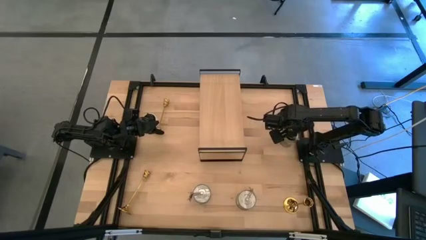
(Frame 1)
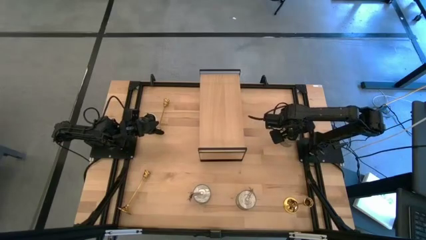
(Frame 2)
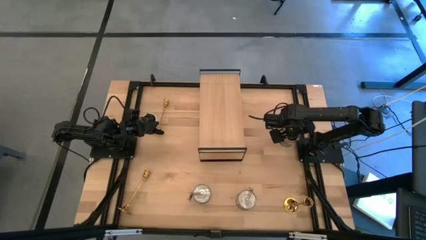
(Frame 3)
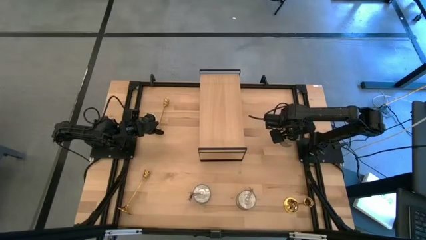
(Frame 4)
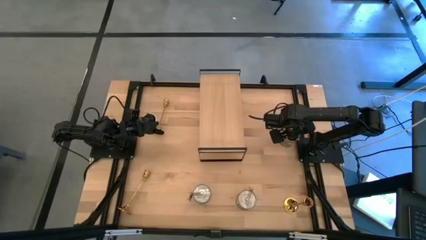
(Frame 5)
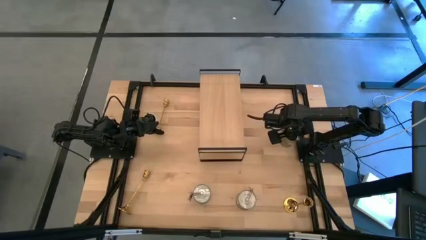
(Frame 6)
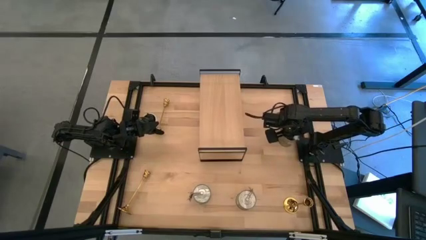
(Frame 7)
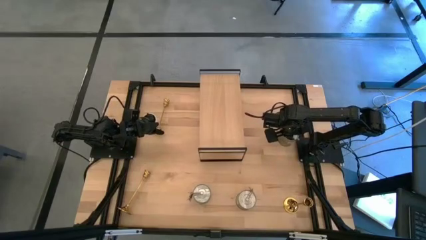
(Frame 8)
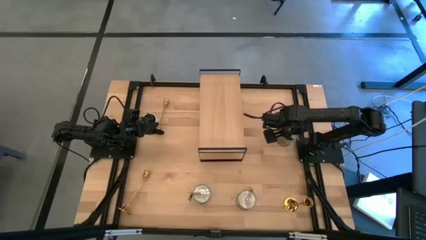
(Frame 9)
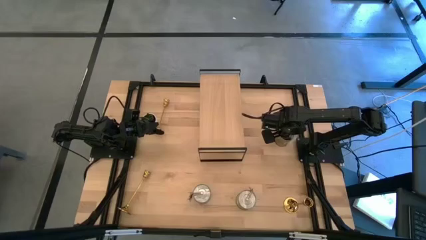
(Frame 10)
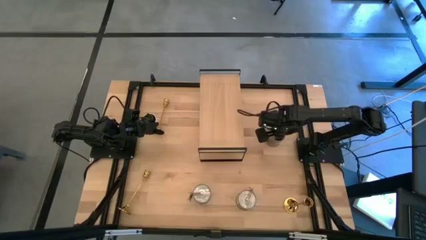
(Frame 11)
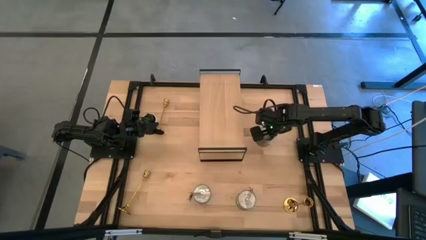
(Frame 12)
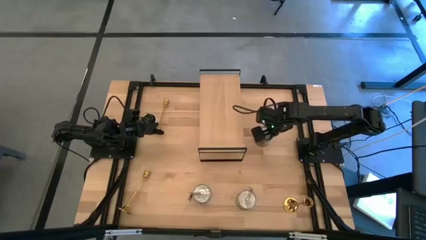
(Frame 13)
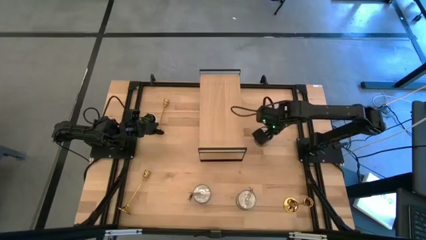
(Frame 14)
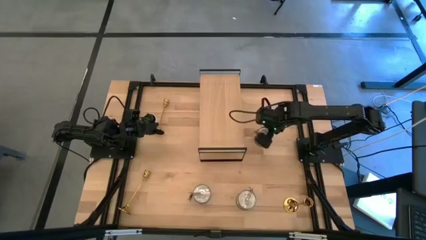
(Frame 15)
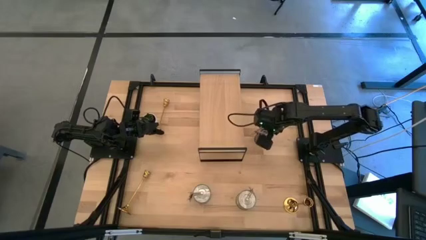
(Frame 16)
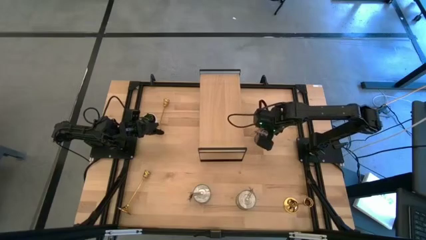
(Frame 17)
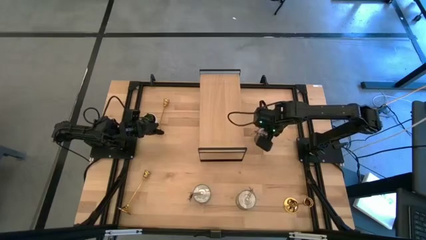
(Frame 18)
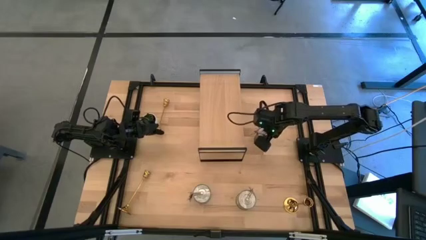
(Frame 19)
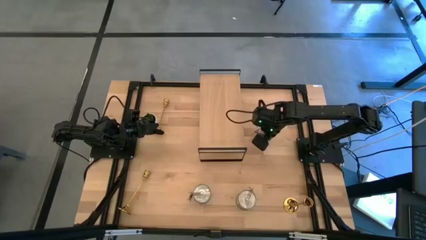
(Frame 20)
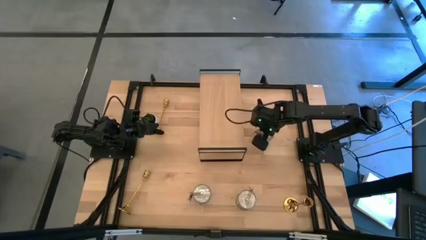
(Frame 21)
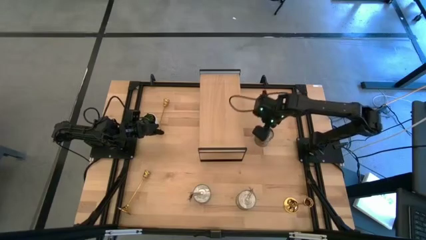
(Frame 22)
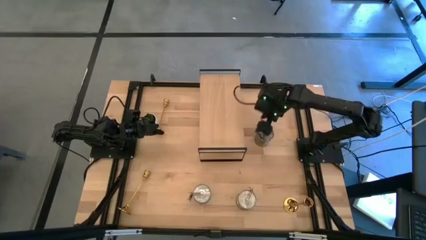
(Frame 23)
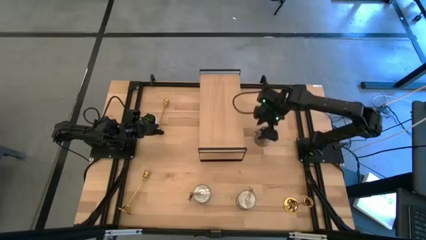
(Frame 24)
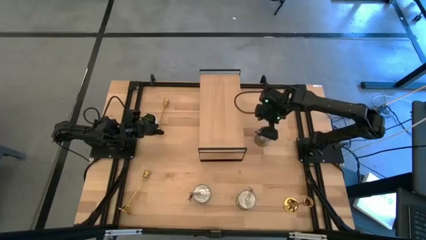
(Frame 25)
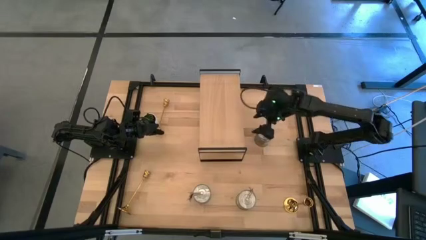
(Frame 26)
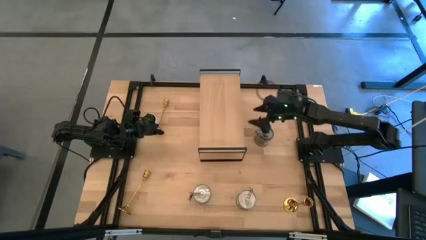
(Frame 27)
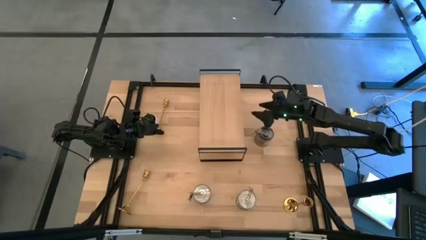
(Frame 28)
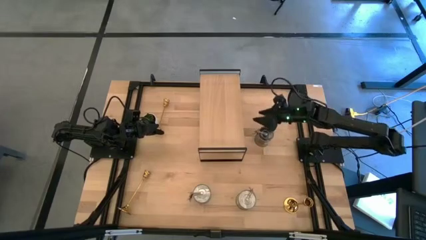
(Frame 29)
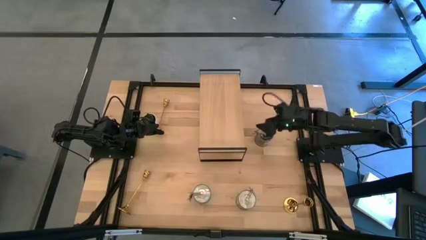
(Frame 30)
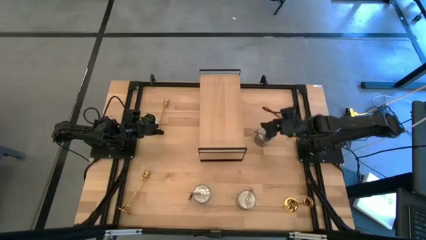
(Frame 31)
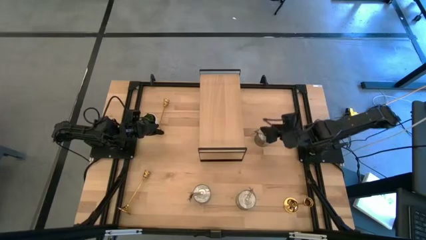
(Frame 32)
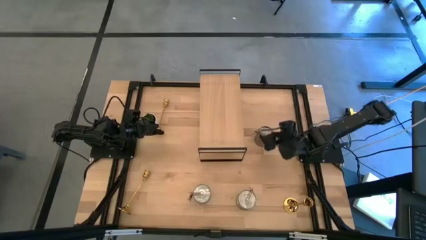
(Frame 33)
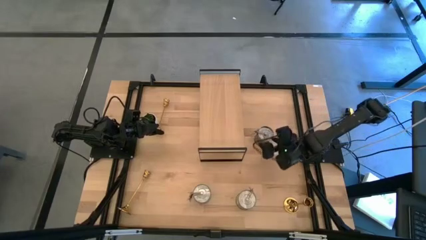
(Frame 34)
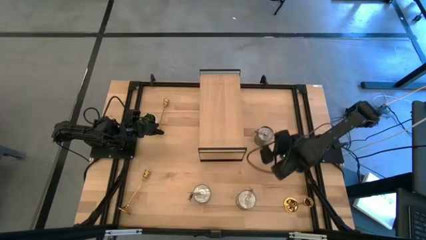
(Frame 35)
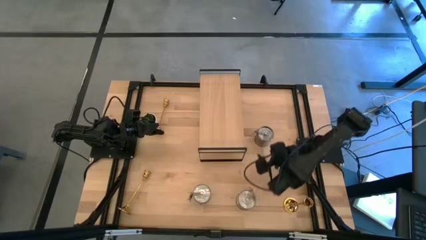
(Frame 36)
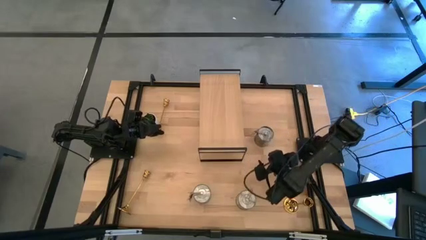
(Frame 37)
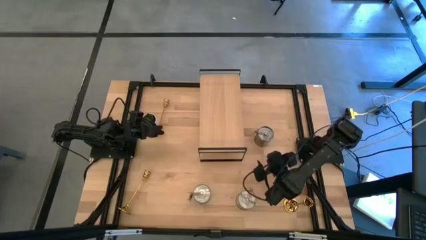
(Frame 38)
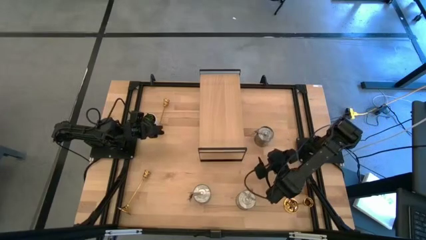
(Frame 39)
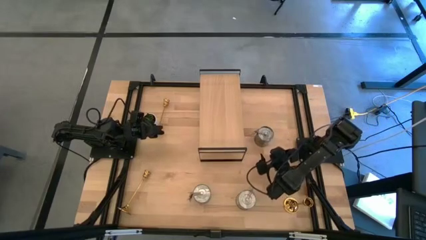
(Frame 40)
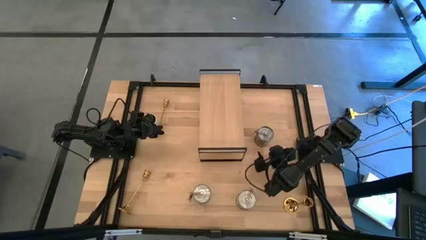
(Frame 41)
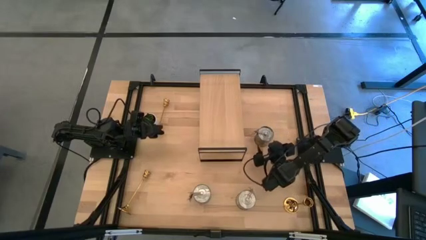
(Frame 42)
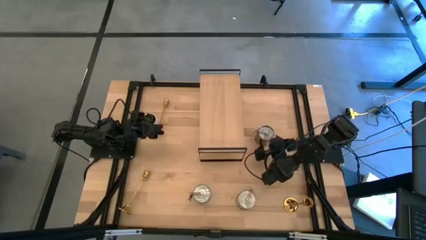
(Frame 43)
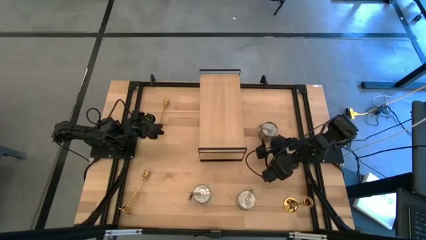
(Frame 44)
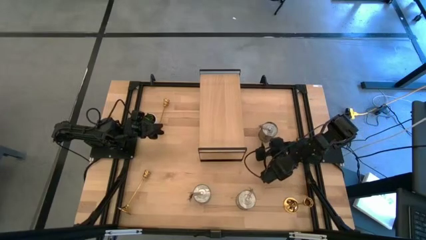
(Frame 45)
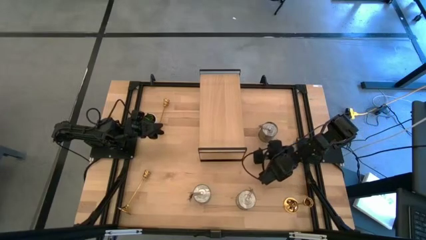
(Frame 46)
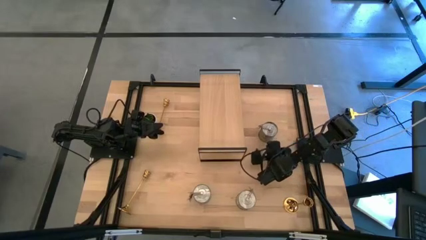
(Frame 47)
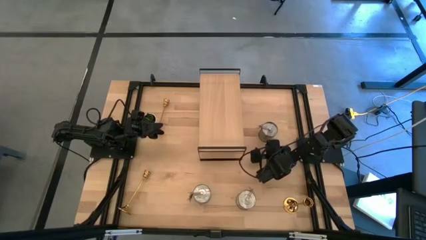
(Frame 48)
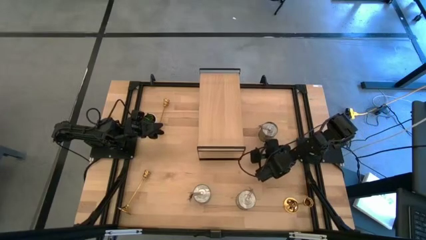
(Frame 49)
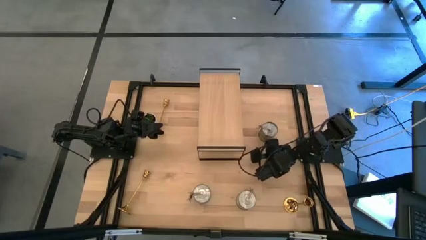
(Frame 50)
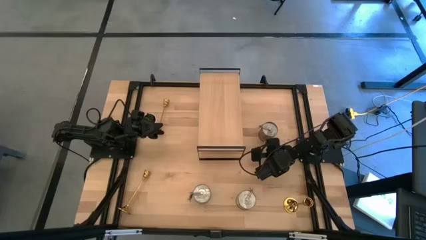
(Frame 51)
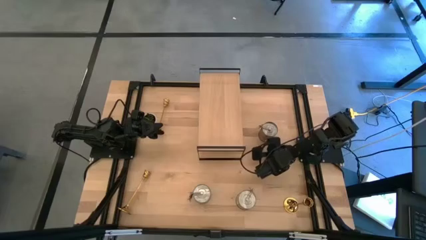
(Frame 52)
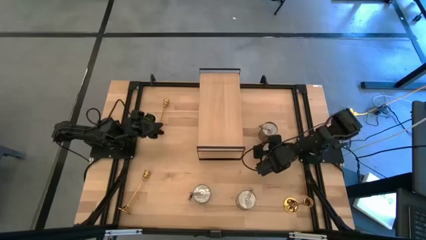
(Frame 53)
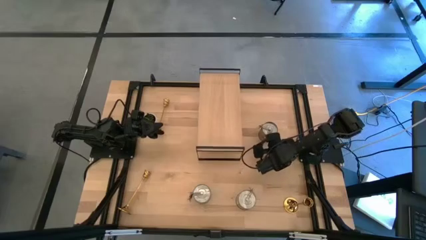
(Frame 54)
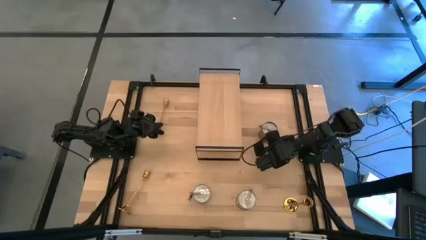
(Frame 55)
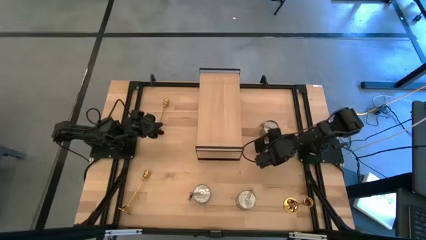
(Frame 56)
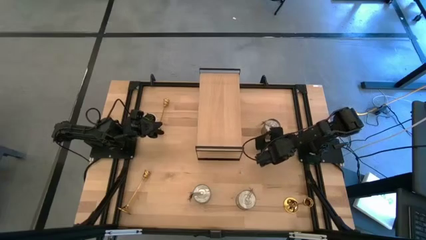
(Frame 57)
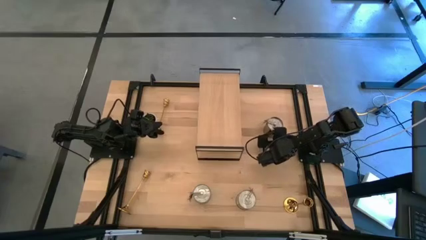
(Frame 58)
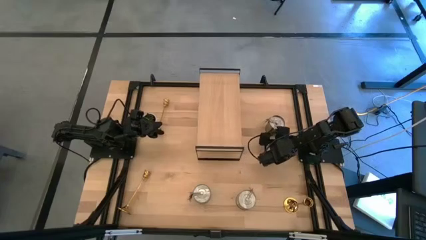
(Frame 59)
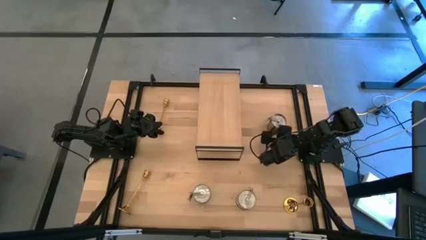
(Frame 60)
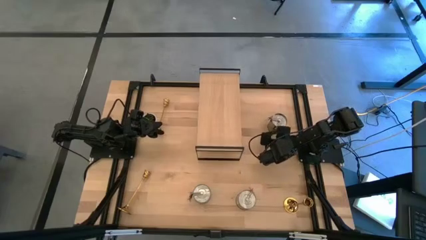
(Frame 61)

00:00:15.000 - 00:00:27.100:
Task: Pick & Place candle stick holders
Put the top silver scented candle on the shelf

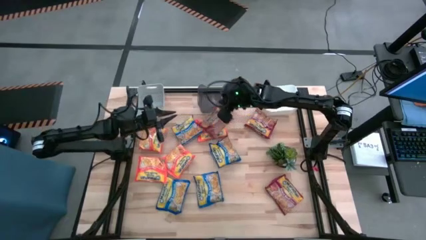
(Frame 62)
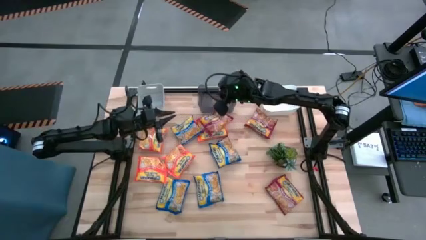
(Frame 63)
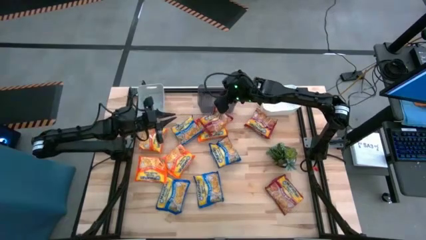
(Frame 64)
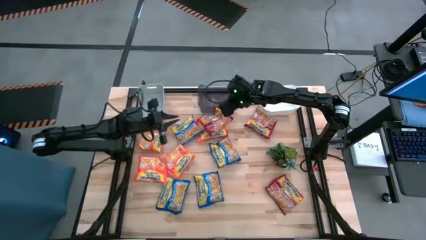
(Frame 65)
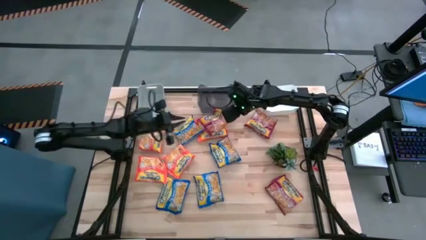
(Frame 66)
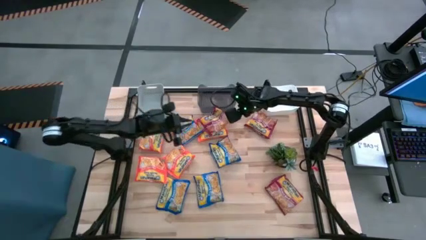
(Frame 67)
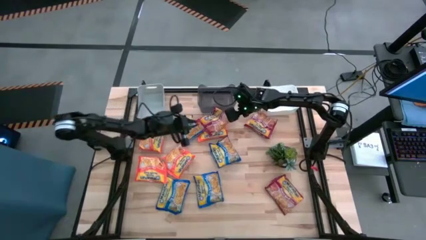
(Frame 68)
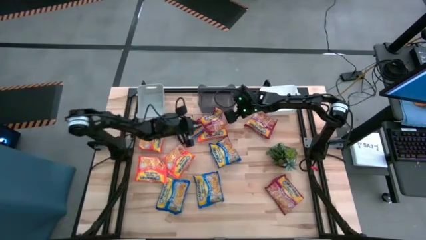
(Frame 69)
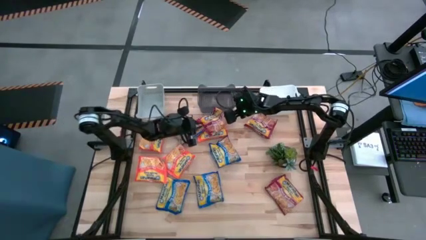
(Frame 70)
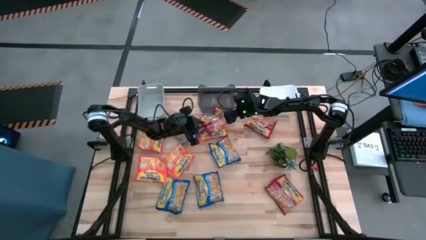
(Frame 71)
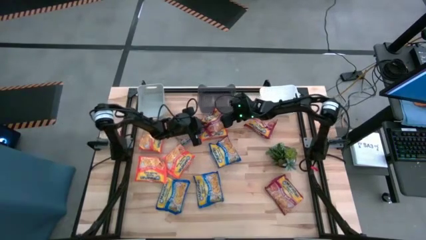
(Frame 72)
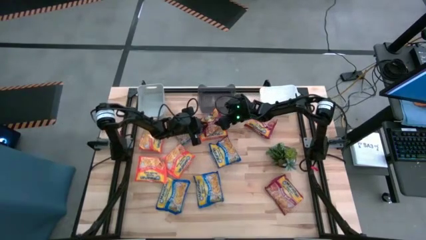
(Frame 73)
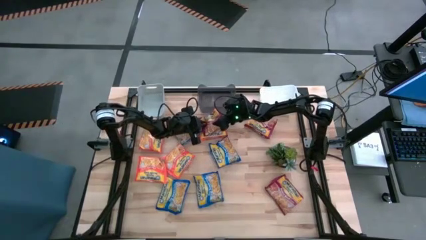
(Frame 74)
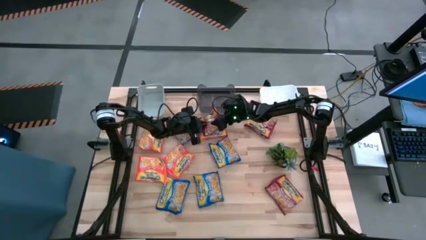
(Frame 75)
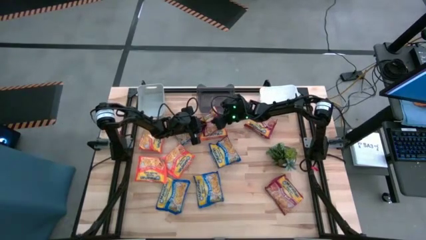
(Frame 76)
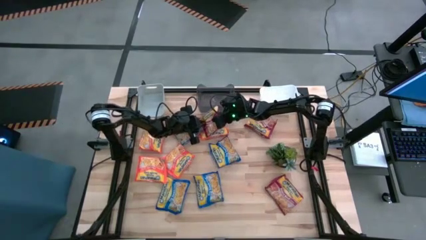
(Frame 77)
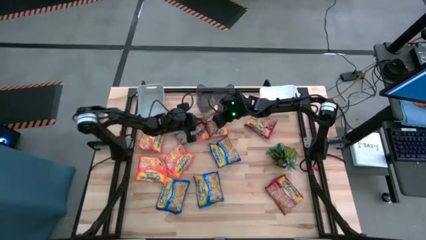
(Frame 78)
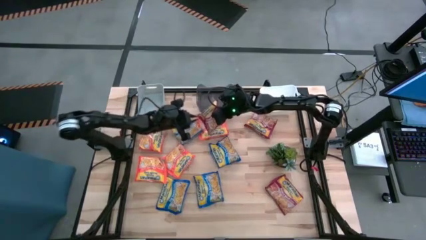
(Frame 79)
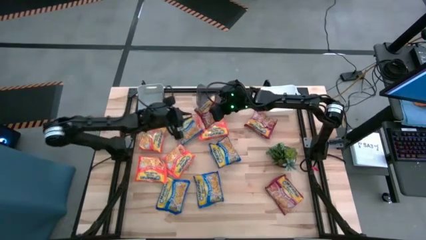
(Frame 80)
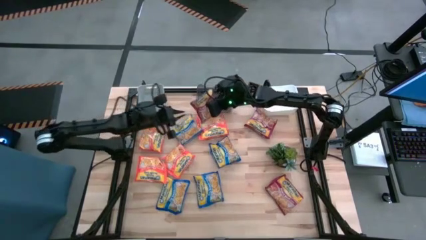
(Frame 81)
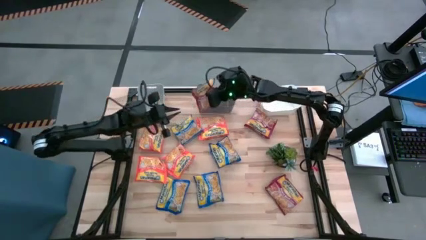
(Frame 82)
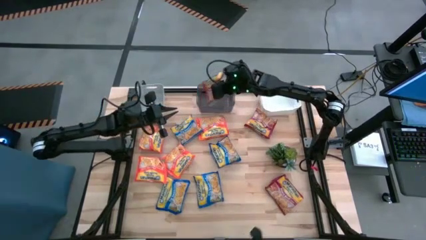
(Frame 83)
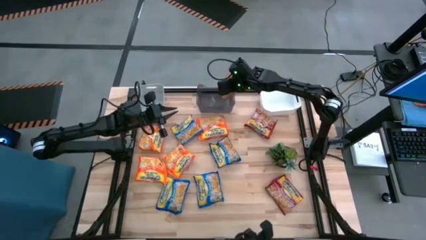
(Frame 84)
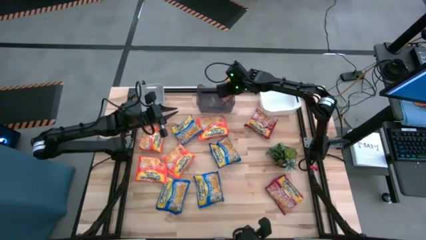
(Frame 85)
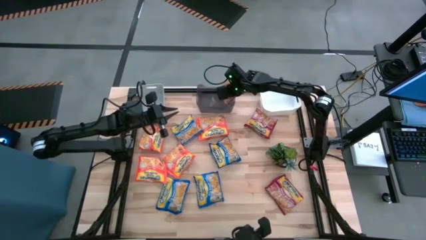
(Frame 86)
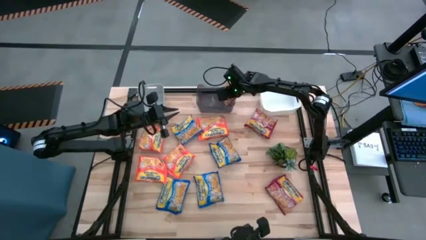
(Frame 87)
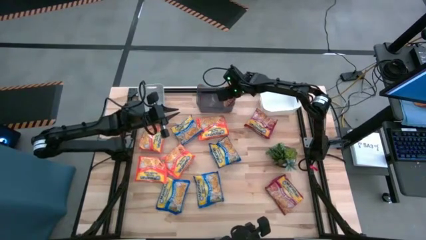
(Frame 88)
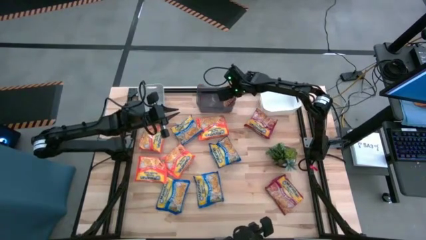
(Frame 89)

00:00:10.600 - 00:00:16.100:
Task: Sort Maruchan noodles
Put the red noodle pack into the black bin
